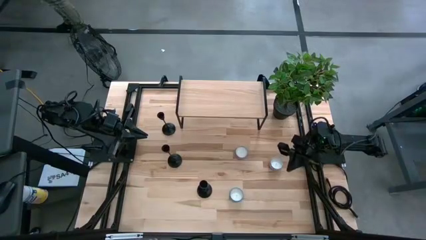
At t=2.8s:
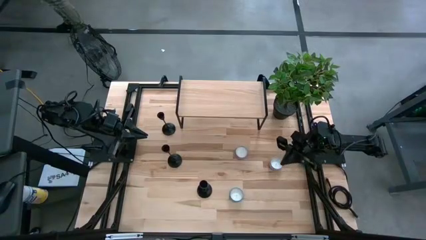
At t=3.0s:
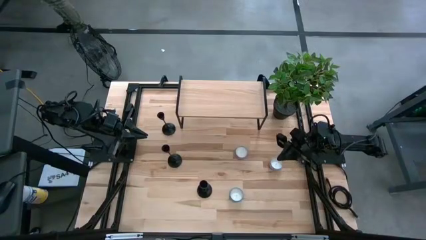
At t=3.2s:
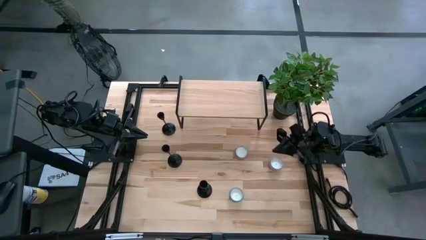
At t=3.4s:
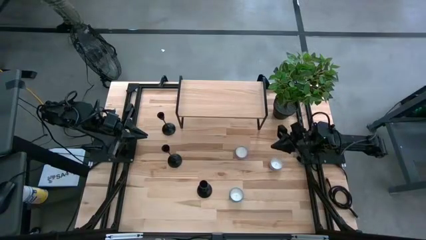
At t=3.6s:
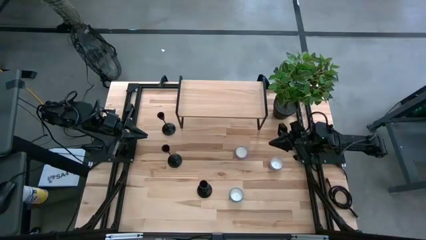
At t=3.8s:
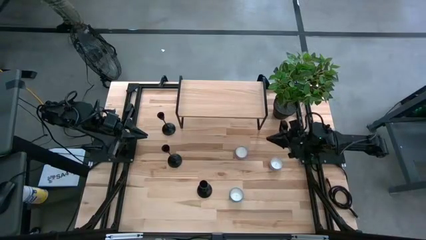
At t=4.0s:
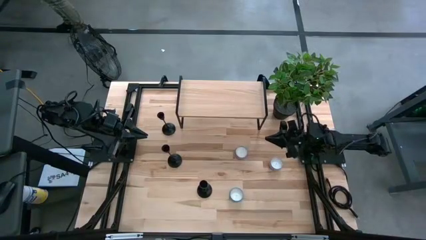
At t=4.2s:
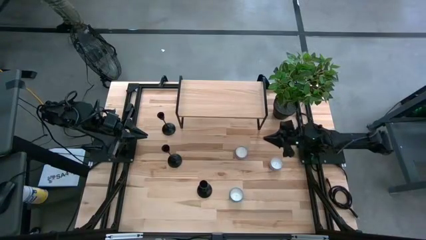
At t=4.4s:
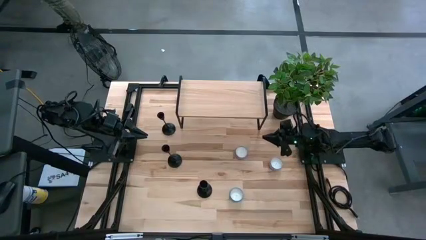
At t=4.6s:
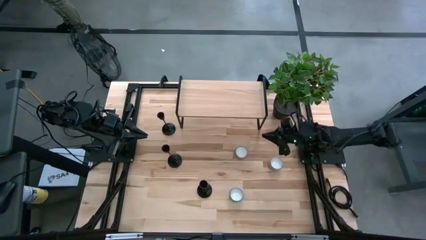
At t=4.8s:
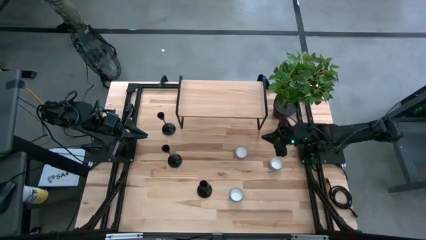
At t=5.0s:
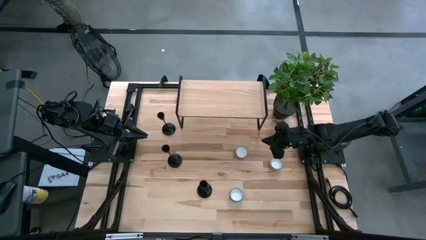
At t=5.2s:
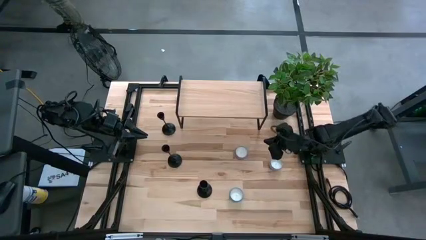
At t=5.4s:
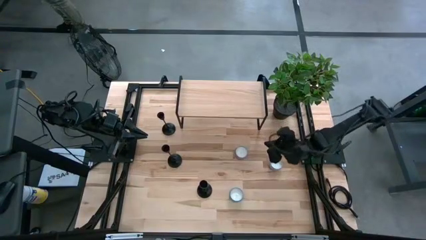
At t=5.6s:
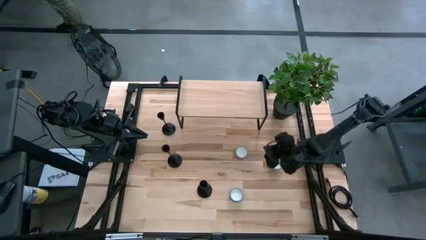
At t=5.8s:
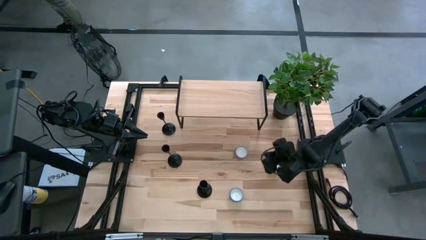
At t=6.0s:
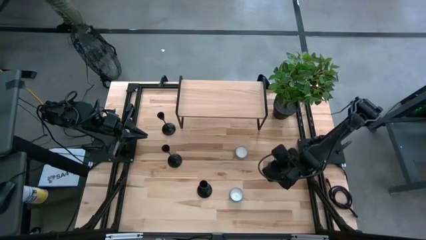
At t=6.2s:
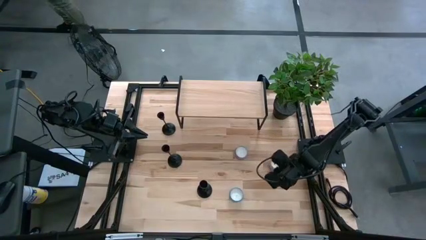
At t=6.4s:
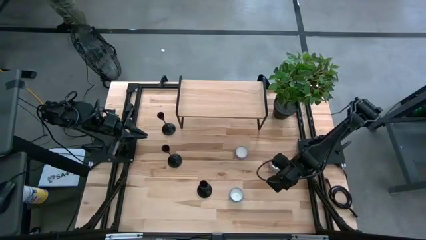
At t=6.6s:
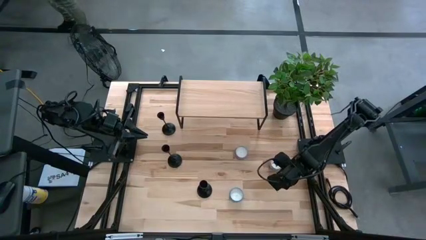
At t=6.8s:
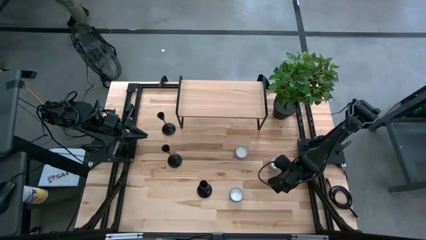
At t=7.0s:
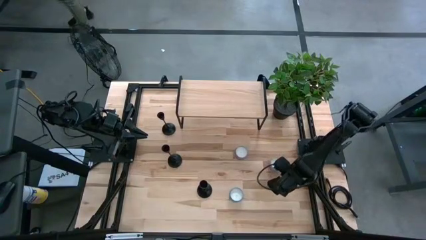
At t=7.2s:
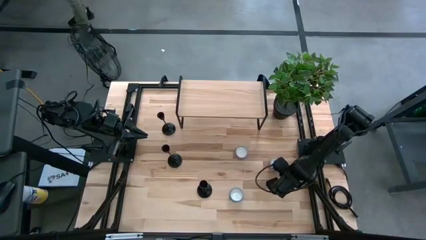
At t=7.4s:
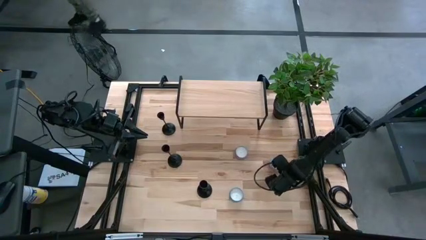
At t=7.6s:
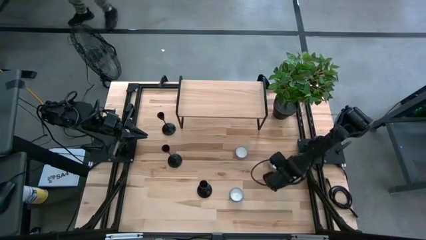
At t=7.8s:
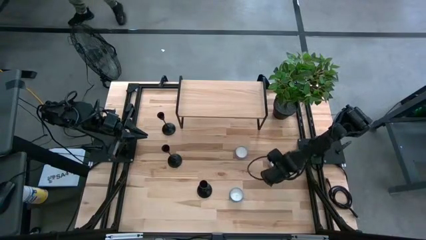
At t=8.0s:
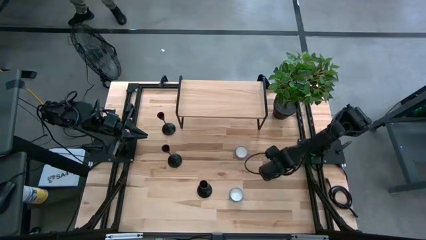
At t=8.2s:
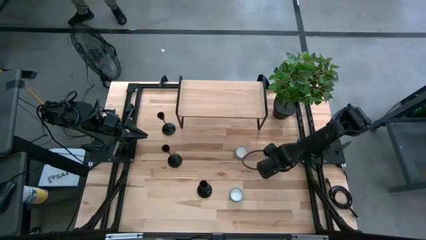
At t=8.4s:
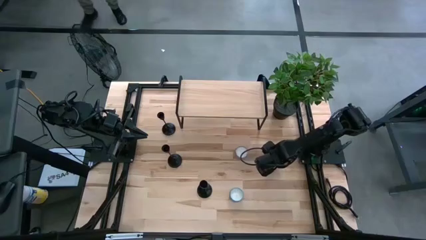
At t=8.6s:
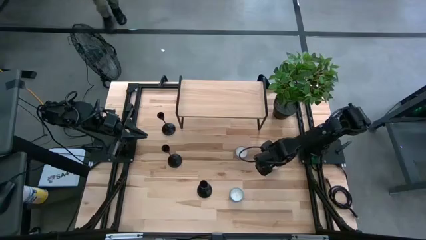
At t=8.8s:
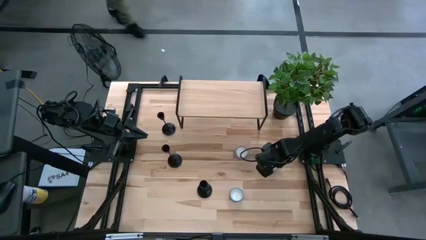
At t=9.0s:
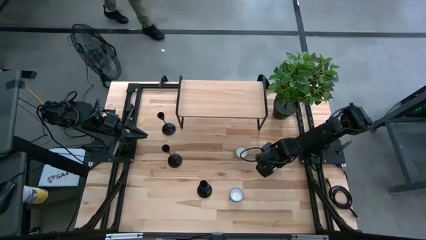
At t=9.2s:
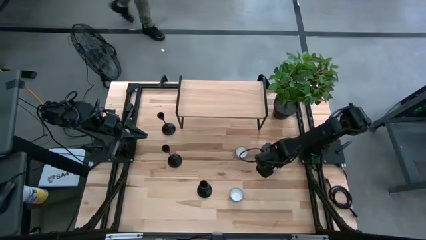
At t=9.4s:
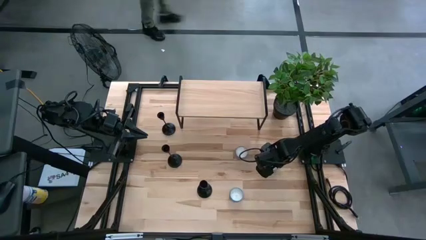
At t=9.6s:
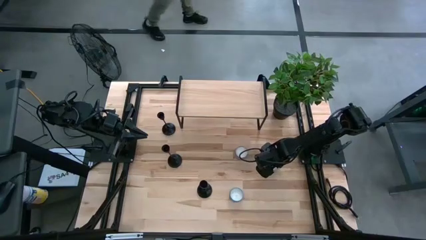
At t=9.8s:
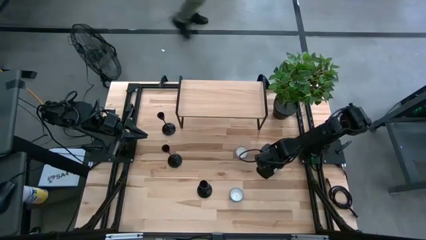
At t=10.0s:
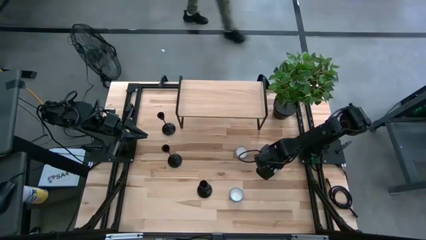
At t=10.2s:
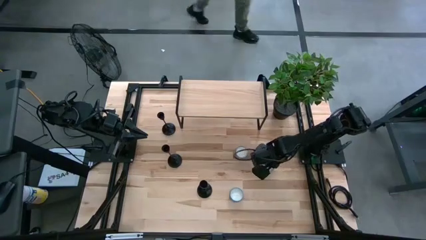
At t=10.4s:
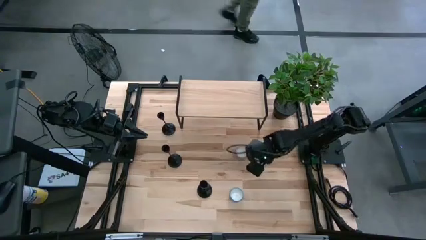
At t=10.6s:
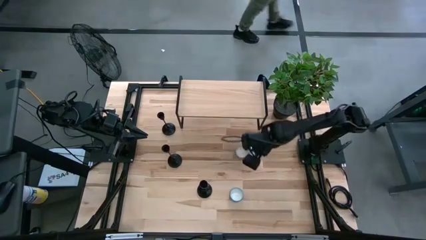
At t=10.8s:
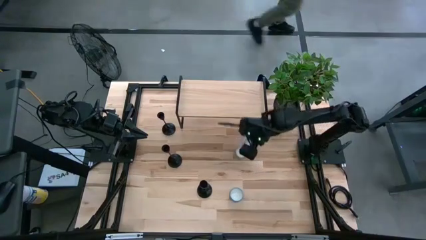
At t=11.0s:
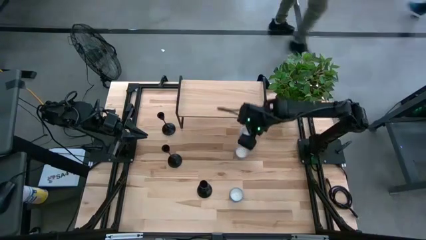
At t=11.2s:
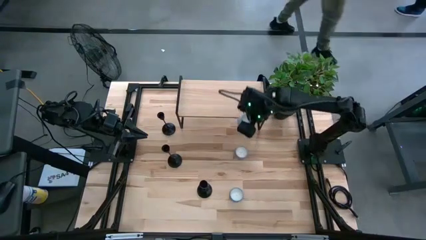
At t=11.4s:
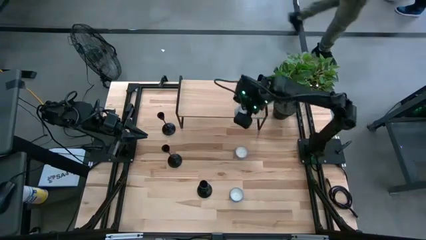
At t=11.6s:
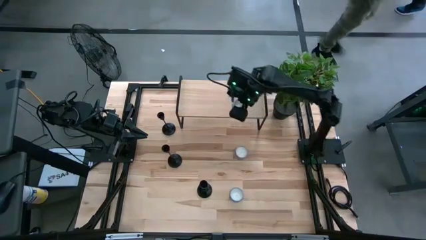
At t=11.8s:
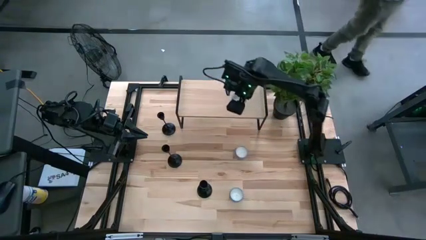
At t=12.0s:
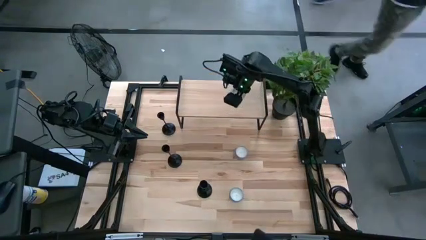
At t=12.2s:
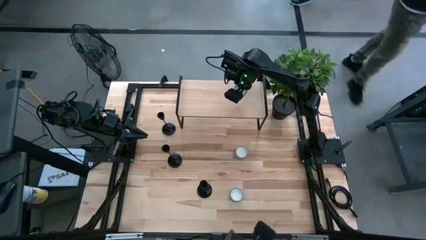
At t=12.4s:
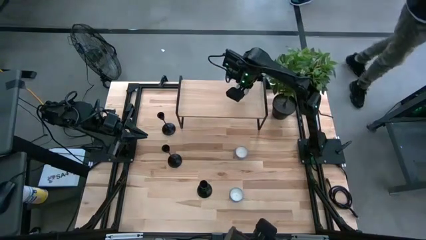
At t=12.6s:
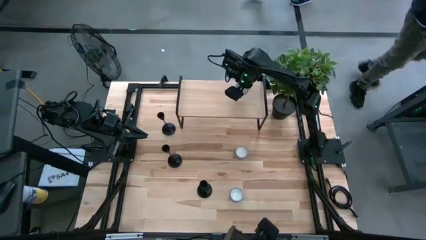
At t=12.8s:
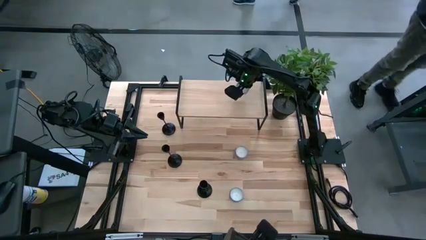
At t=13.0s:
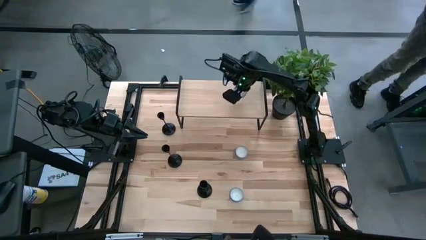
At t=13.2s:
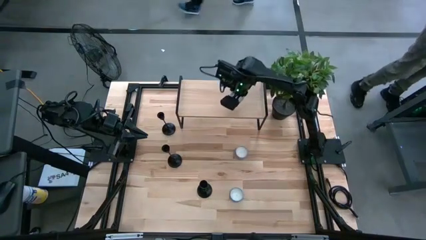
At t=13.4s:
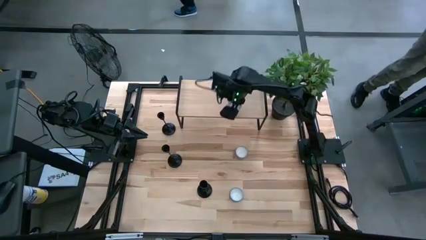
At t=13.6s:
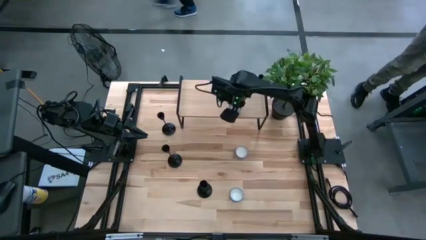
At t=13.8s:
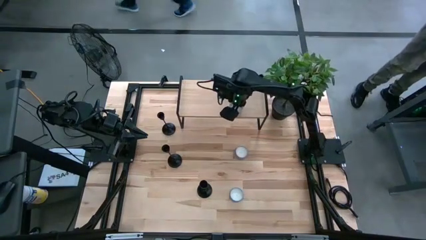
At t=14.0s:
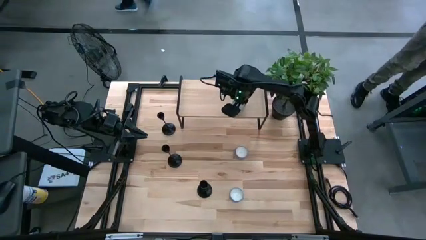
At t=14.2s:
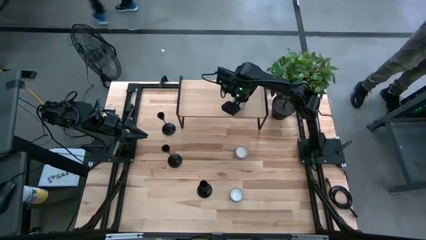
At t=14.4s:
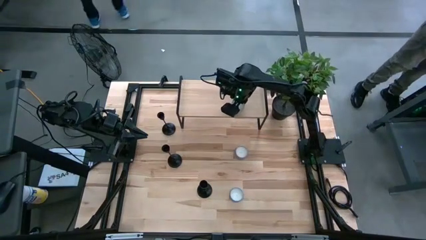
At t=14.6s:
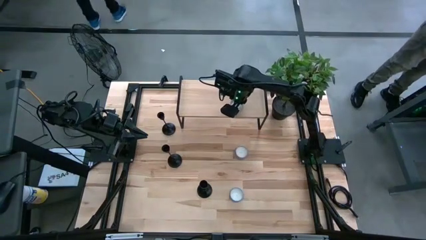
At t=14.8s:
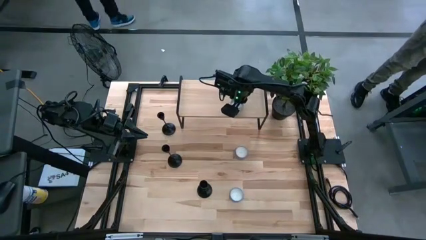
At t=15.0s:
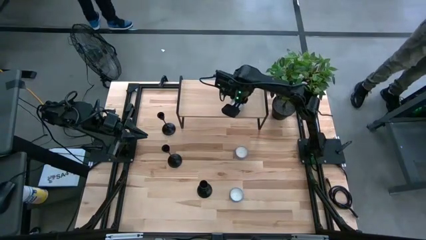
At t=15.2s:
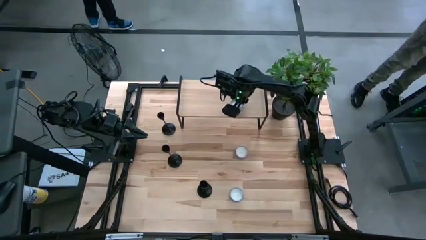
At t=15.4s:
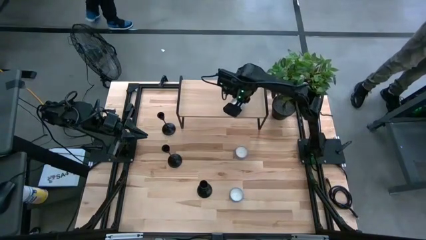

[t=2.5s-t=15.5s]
Task: Pick & Place candle stick holders
Put the red scented candle on the shelf
